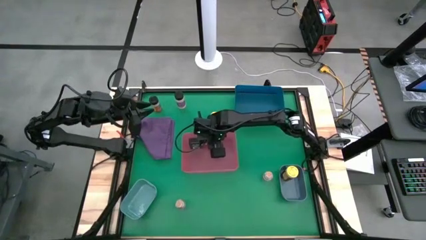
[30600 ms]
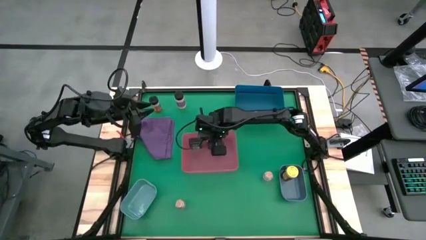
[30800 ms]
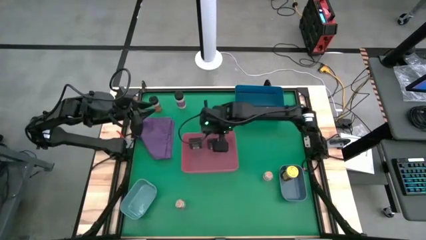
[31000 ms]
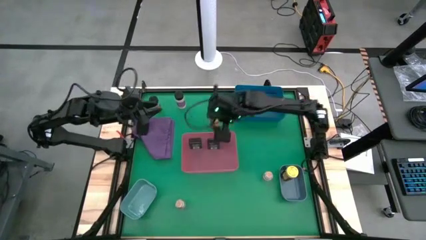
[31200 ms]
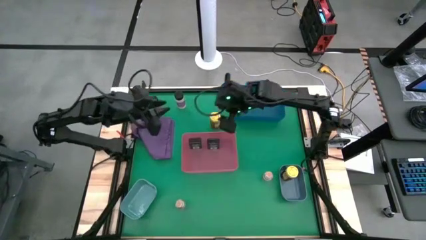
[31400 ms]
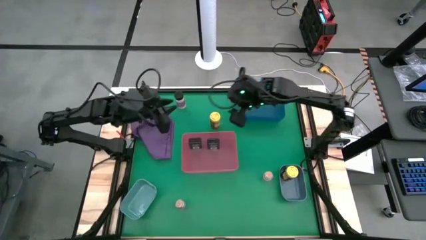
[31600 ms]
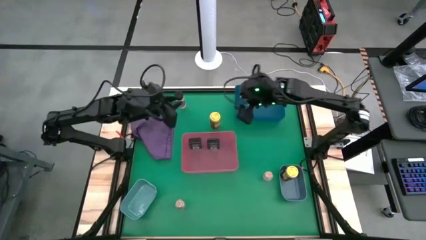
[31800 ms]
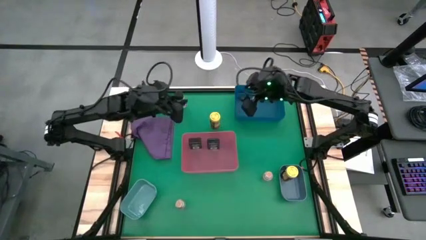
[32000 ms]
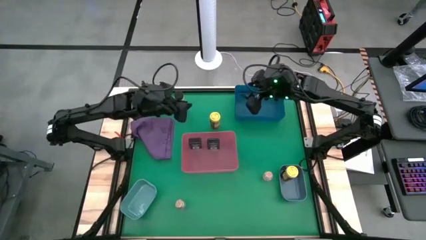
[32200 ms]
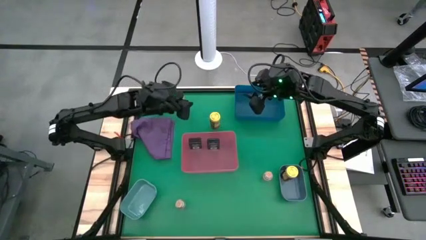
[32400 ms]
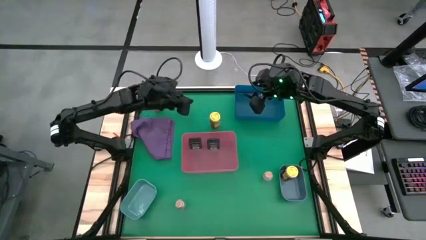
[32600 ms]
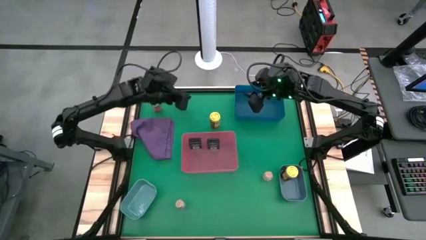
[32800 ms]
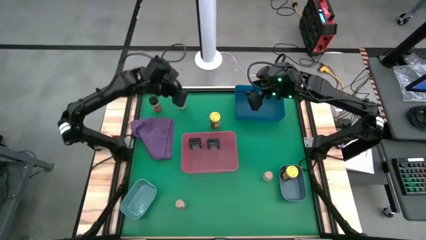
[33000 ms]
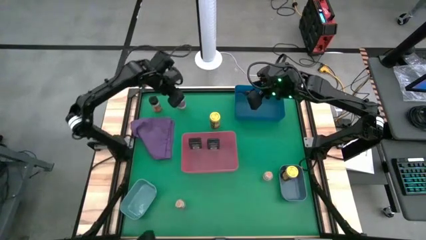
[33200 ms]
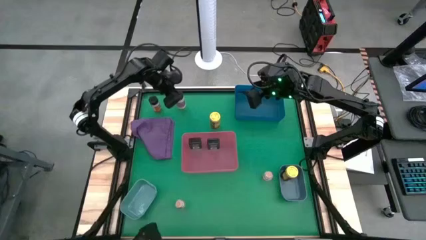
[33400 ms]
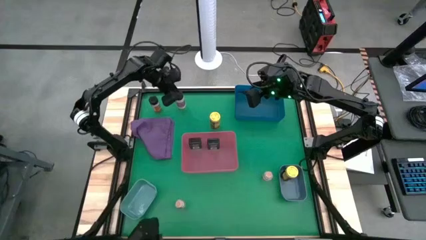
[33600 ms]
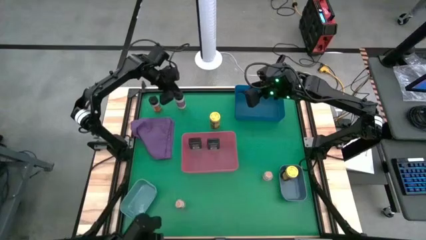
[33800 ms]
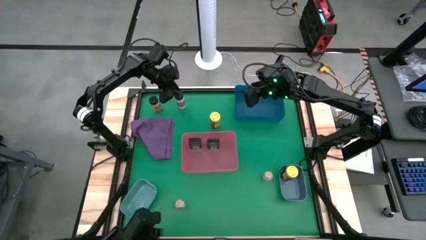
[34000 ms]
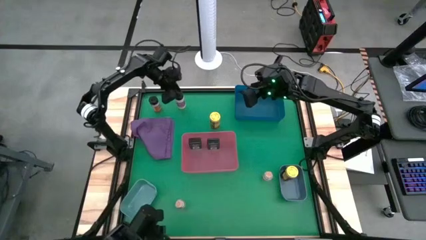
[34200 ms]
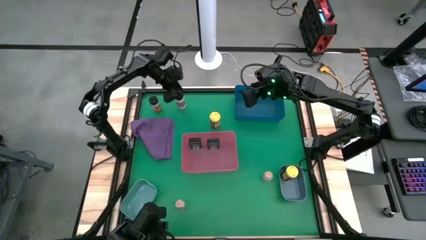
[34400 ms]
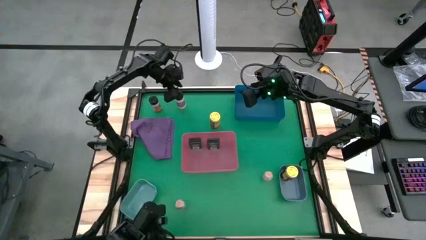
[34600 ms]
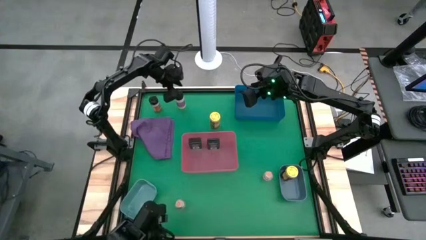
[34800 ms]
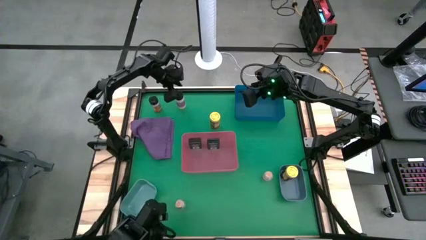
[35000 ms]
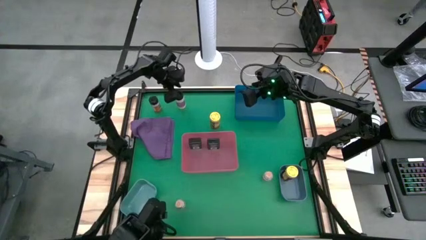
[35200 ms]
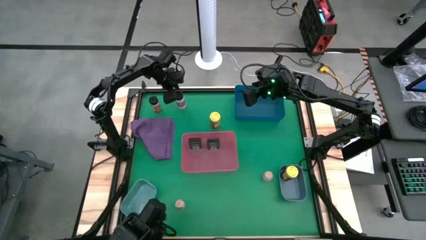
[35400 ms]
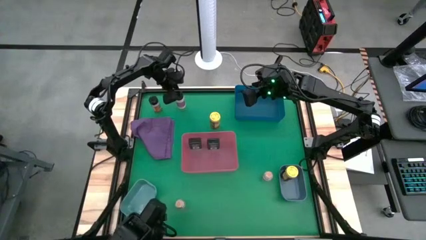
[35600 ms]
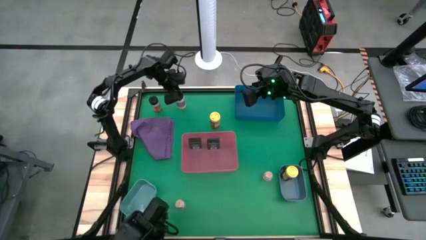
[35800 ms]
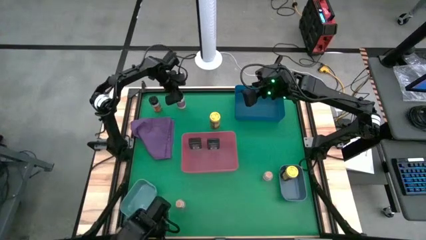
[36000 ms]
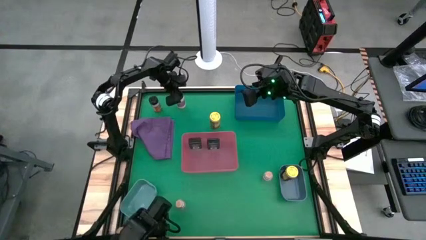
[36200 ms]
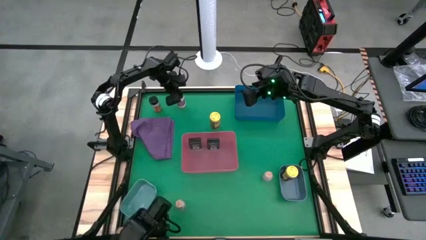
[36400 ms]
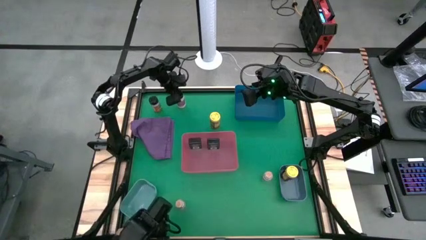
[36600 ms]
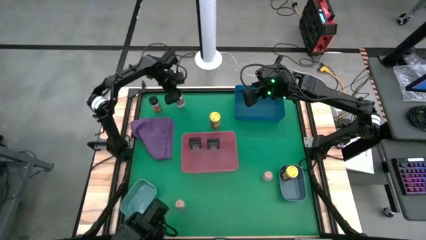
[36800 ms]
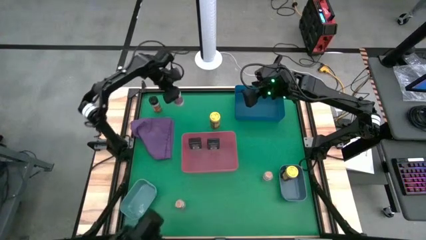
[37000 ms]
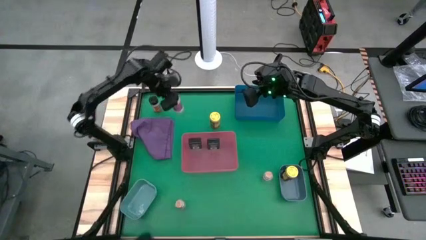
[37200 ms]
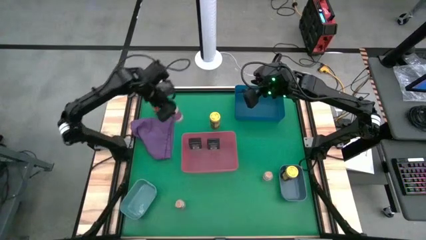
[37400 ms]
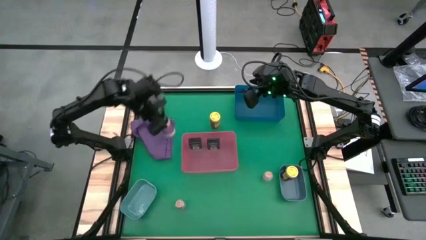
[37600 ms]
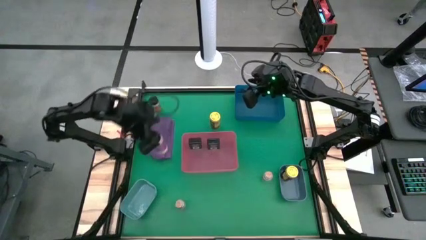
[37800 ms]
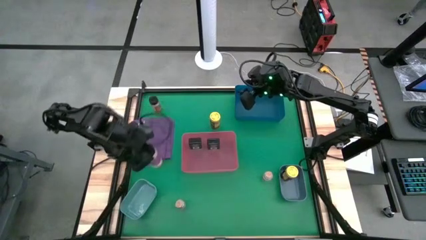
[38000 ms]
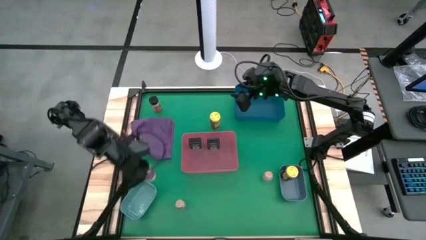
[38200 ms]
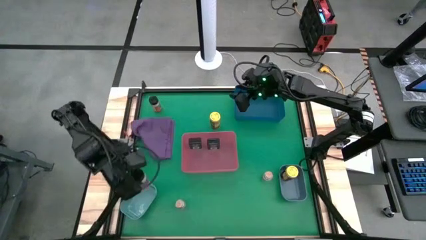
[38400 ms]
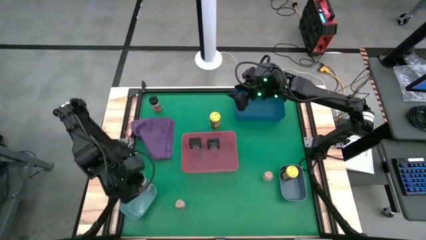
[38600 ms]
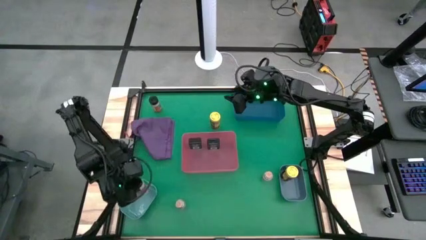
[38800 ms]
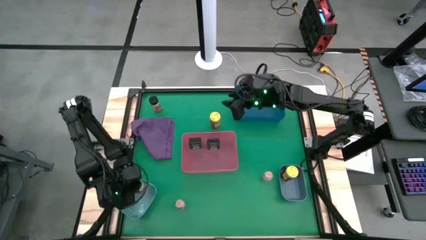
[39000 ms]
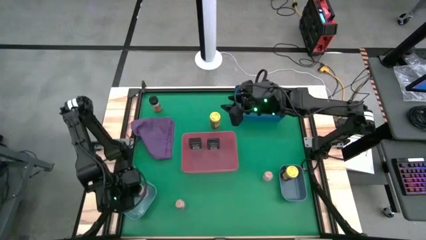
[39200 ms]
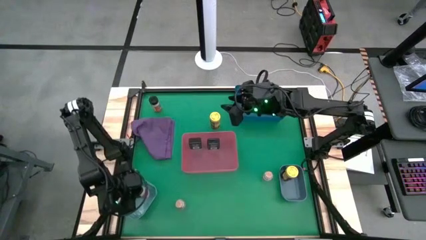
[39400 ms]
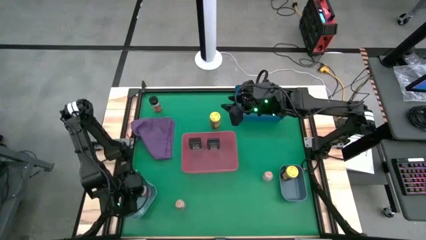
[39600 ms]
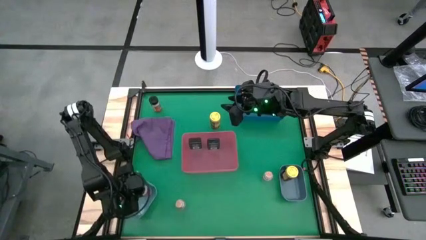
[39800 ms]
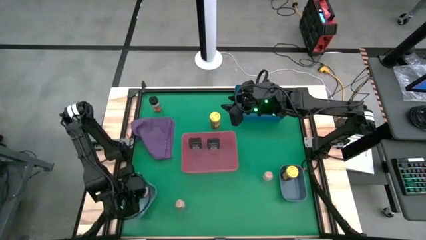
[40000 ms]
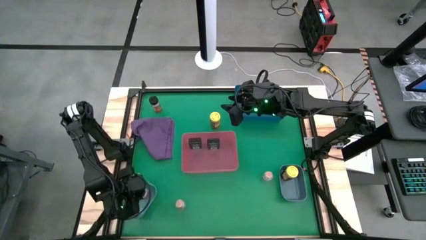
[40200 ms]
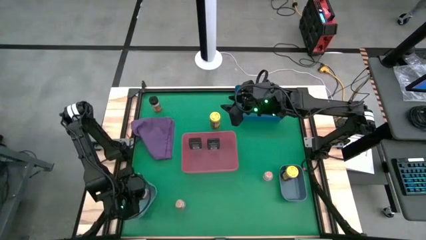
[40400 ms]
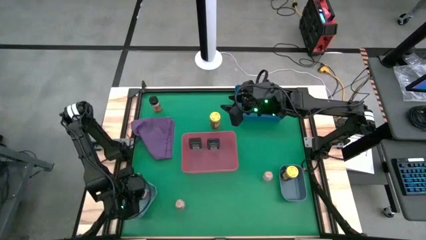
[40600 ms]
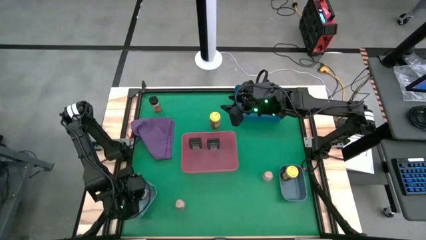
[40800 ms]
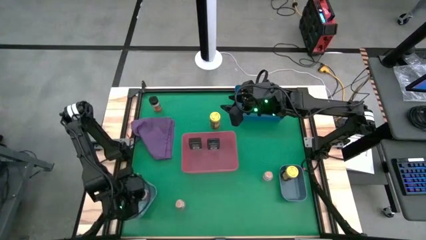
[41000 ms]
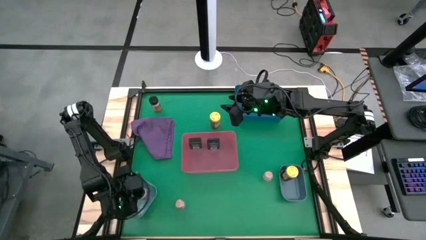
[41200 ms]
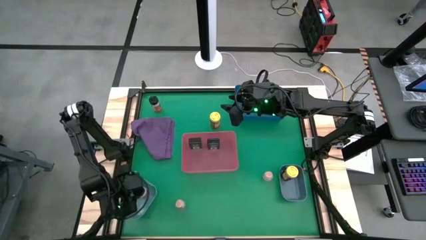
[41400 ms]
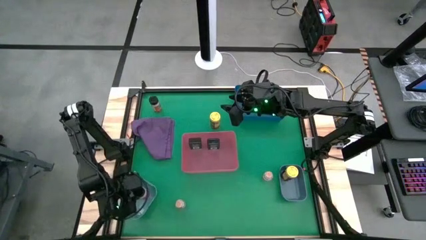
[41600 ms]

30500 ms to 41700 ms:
Task: Sort spices by type
Put the right black seasoning bottle into the light blue bin
